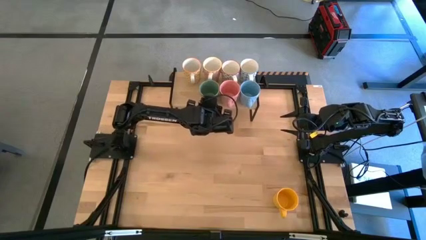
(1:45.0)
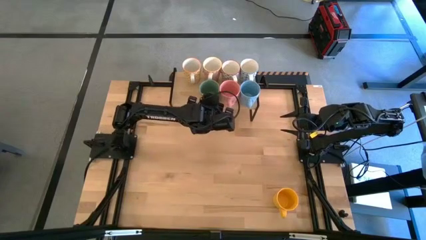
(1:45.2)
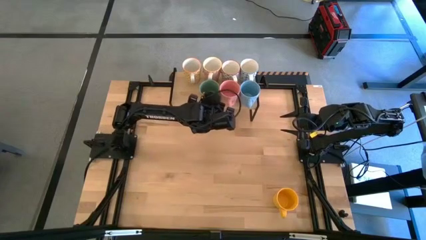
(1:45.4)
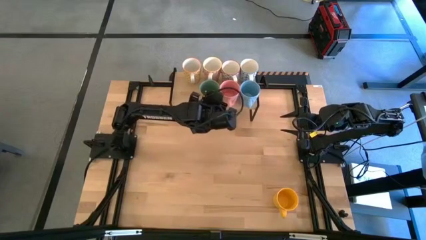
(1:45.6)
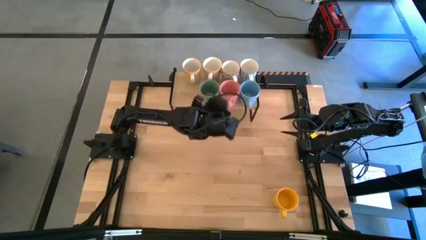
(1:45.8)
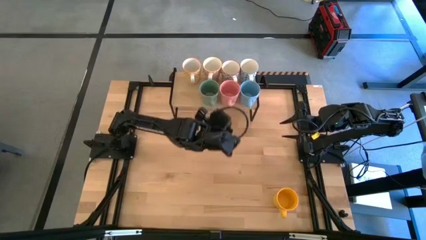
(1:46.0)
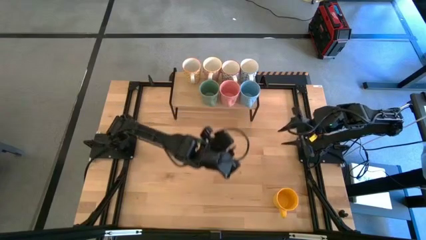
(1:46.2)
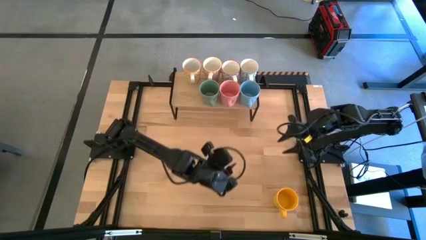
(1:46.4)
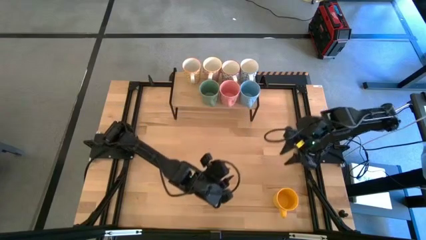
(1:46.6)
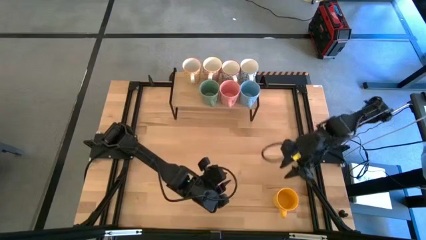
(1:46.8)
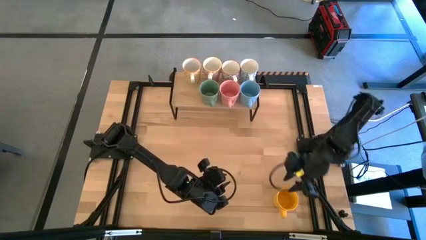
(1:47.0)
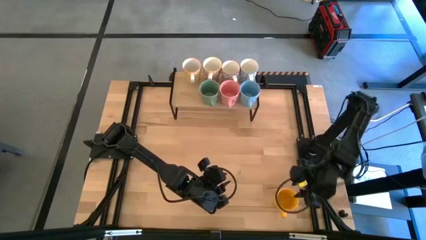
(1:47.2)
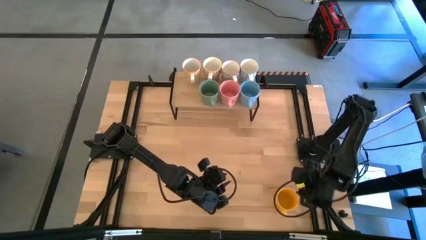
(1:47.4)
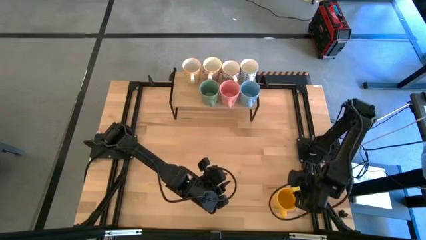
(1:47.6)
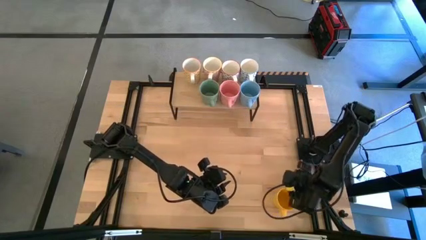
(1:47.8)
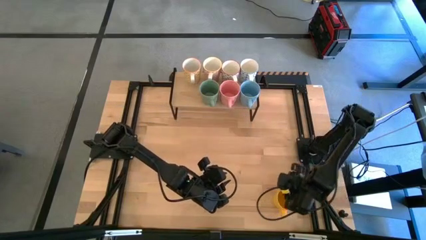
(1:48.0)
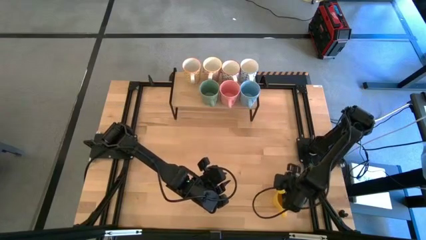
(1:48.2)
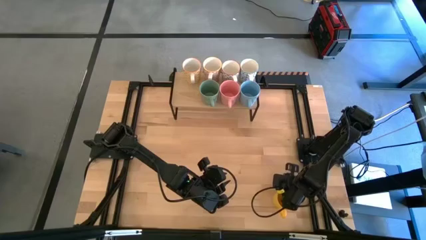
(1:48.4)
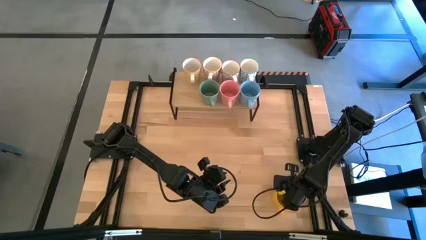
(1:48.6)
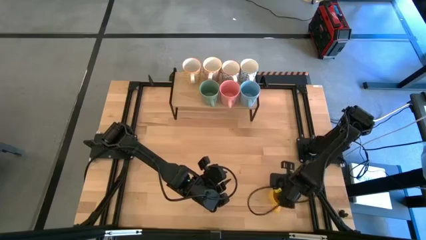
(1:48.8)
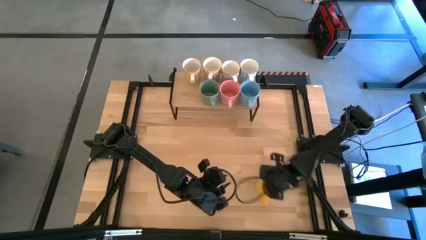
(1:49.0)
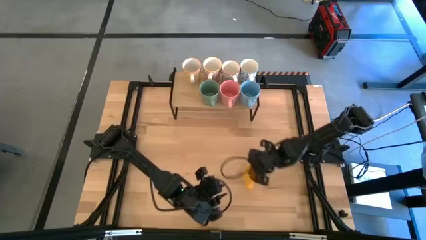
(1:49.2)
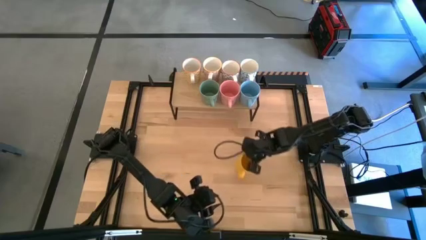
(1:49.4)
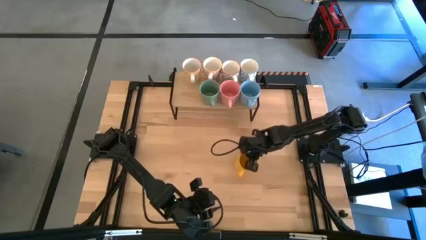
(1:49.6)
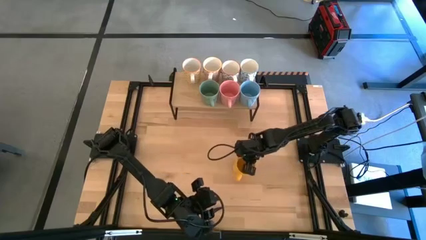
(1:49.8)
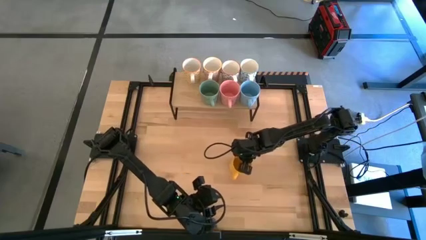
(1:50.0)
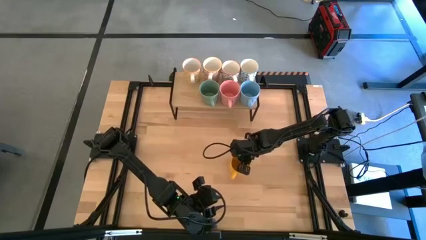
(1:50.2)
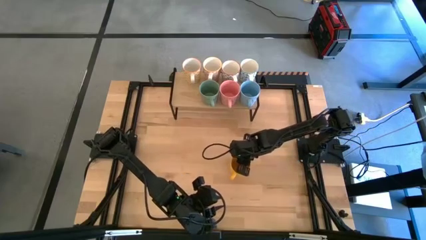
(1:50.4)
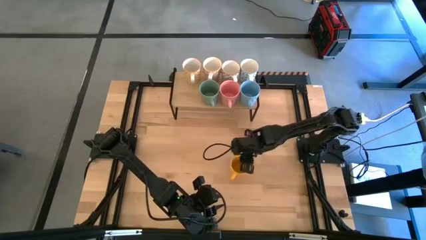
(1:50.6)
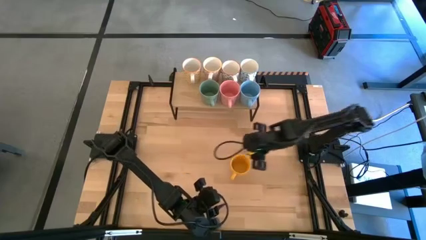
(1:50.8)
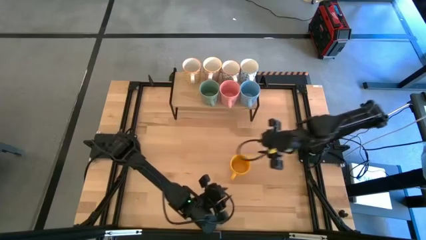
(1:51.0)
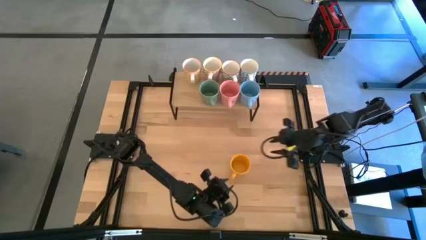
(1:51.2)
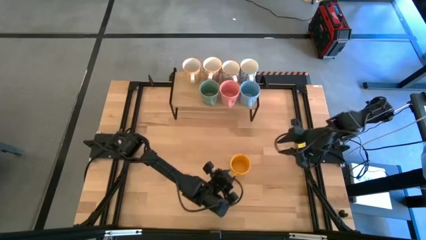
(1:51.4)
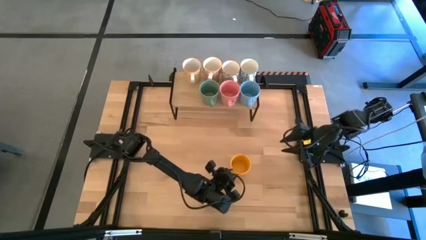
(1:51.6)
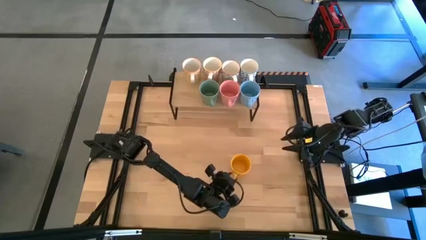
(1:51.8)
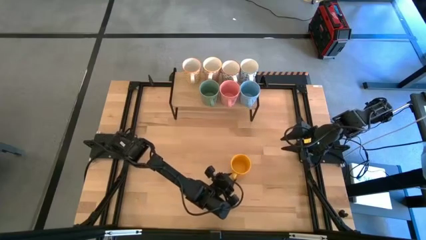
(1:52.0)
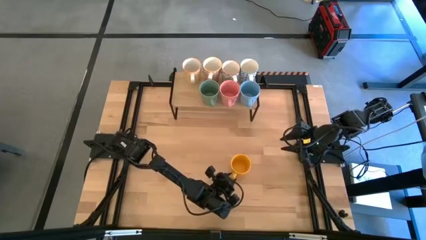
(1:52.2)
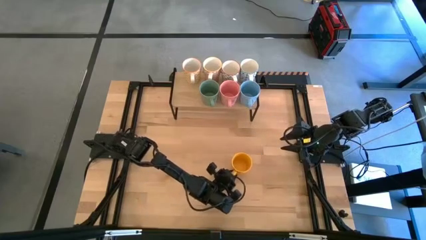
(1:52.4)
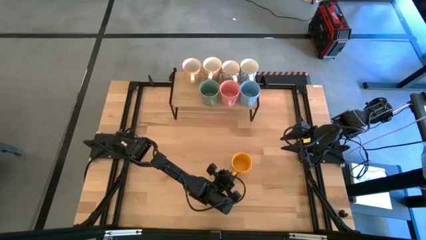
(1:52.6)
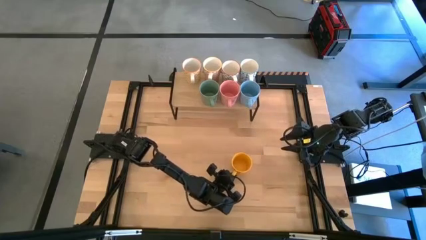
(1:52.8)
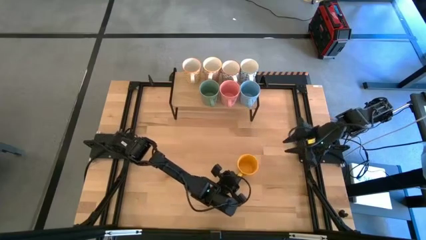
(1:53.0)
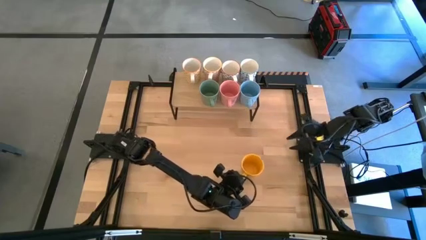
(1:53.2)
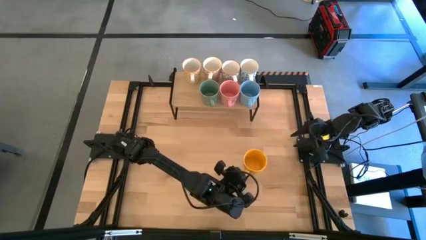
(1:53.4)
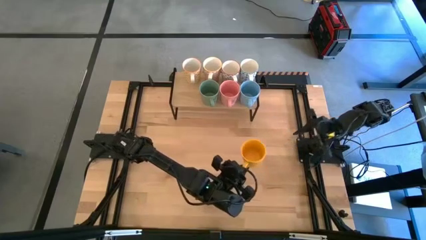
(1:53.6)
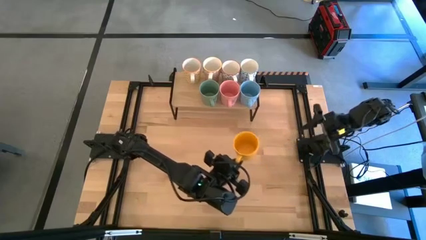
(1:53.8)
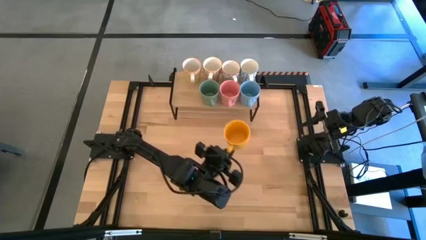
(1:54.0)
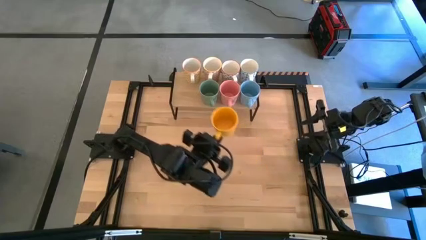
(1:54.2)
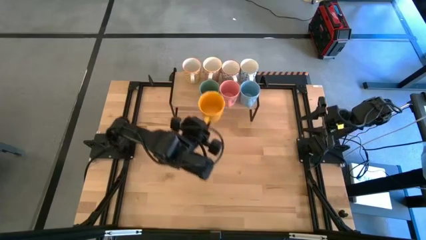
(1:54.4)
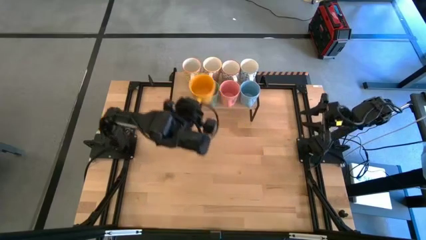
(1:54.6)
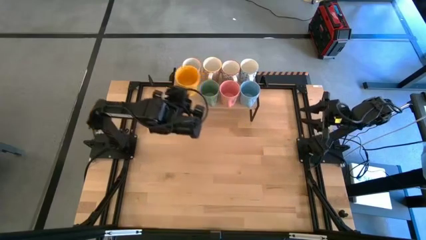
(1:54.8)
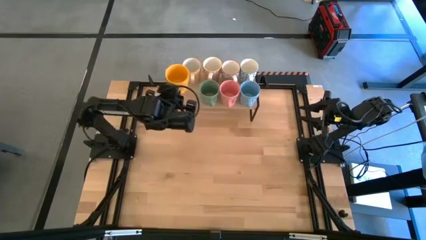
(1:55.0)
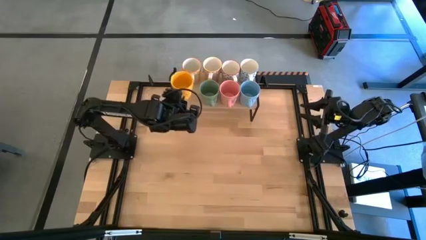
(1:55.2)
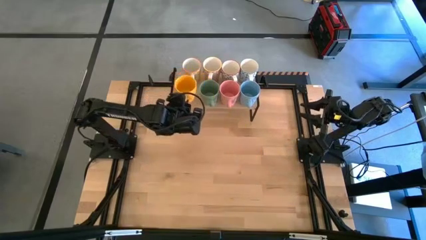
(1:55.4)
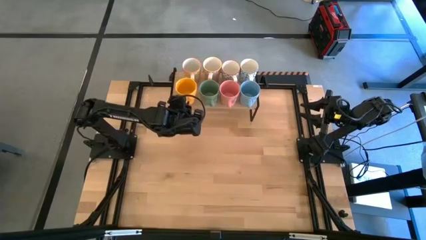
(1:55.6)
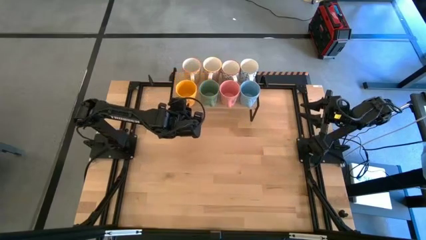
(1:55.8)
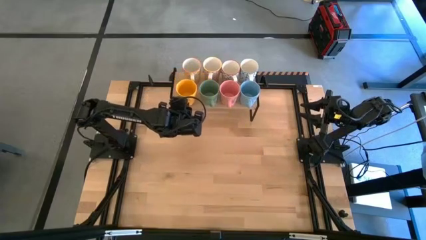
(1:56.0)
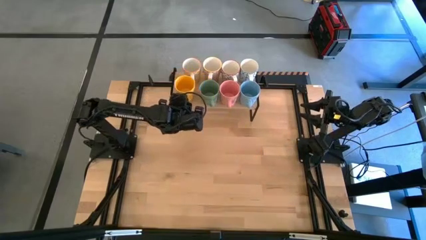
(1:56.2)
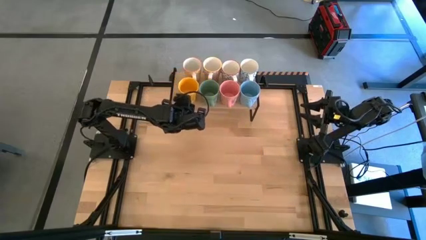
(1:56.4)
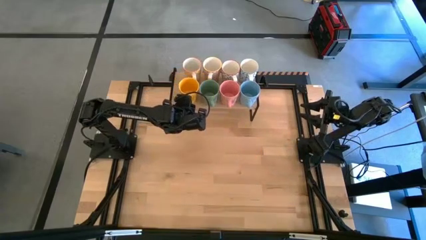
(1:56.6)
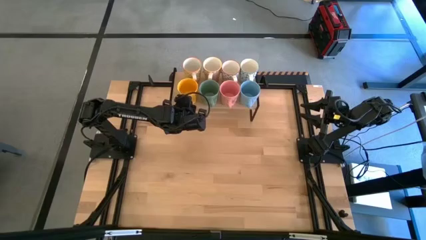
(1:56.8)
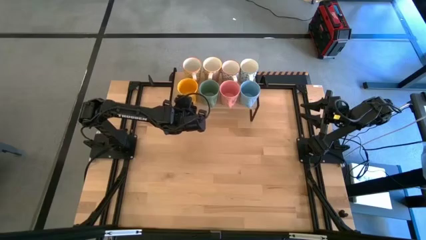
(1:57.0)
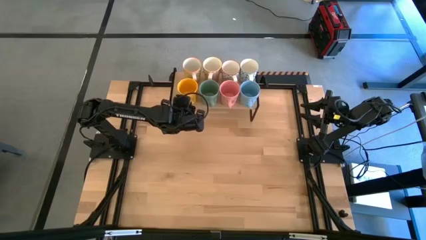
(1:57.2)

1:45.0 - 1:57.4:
Task: Place coffee mugs
Put the yellow mug on the shelf

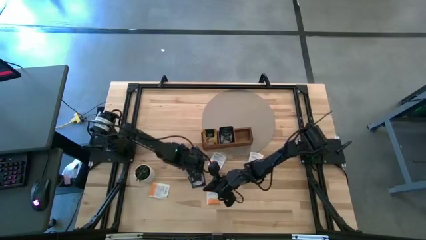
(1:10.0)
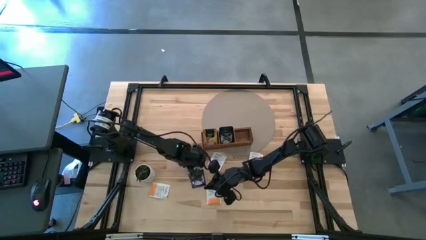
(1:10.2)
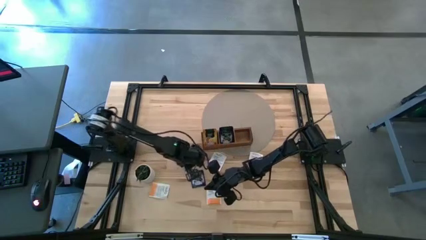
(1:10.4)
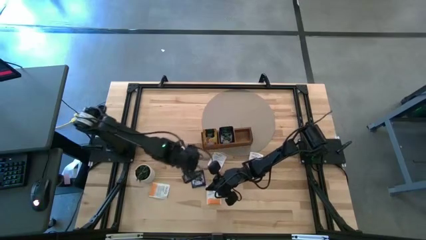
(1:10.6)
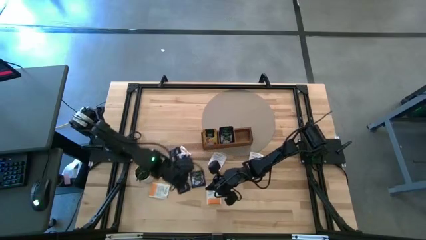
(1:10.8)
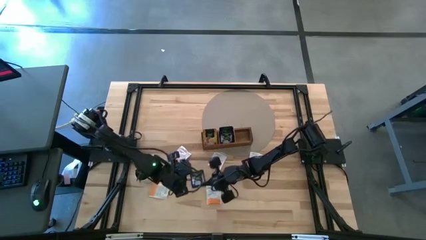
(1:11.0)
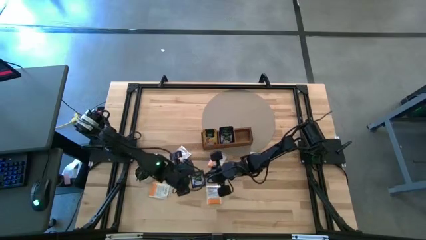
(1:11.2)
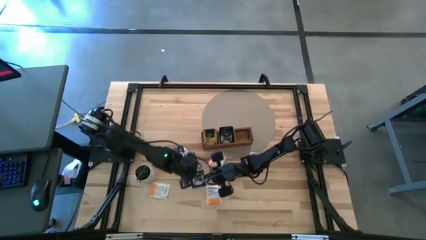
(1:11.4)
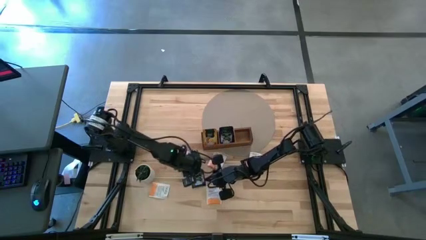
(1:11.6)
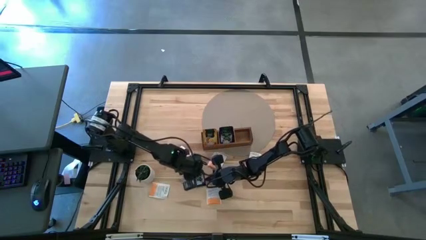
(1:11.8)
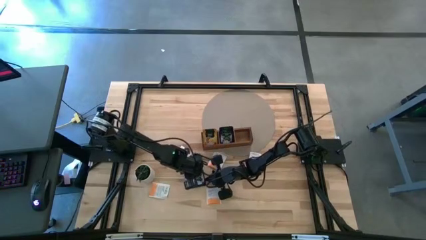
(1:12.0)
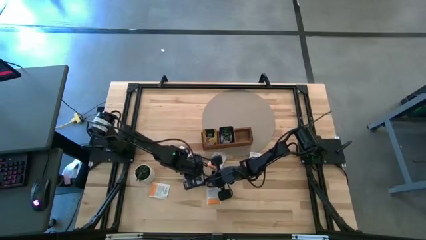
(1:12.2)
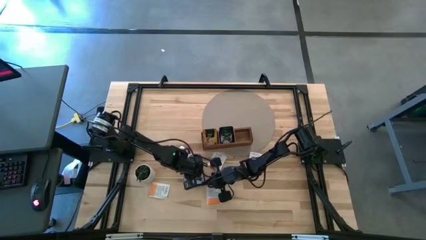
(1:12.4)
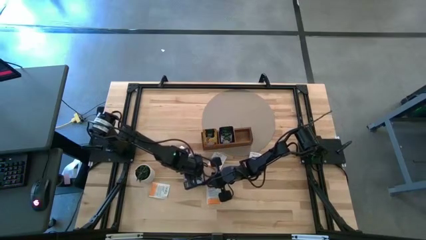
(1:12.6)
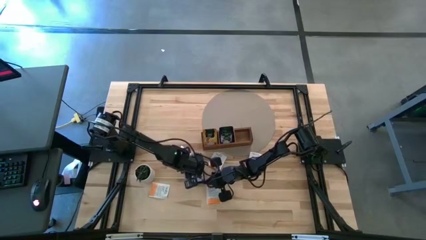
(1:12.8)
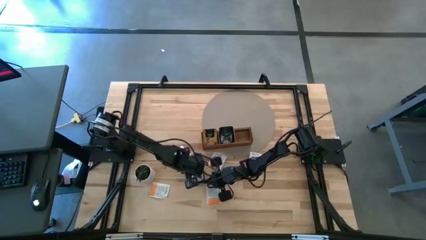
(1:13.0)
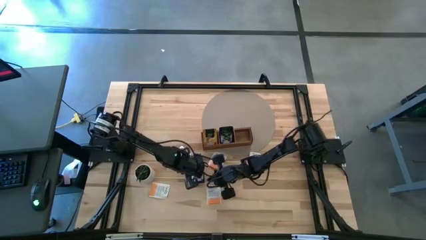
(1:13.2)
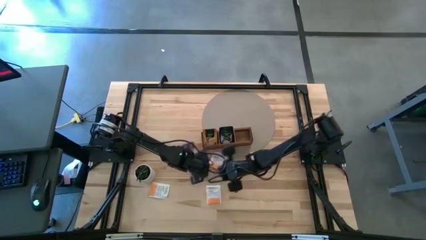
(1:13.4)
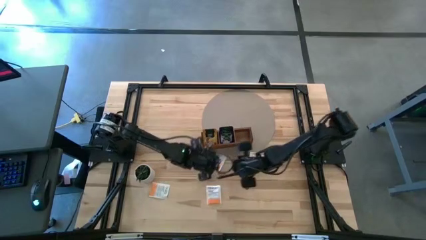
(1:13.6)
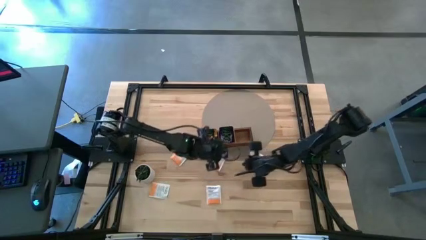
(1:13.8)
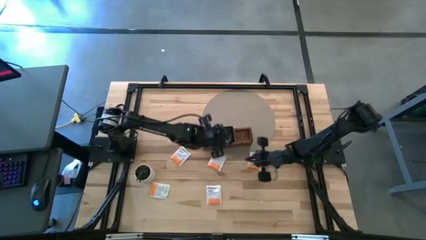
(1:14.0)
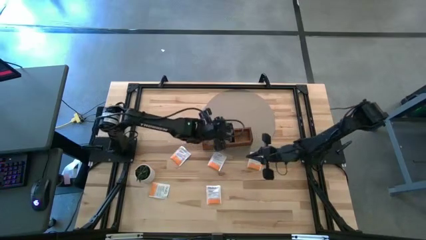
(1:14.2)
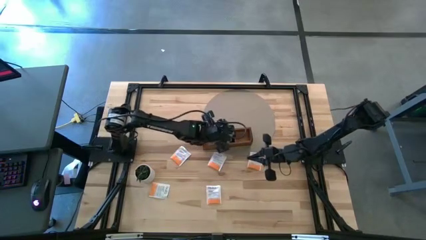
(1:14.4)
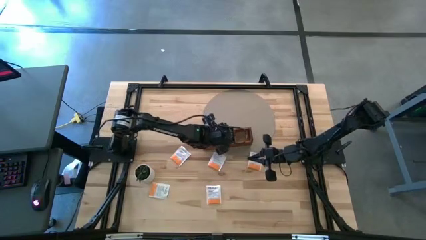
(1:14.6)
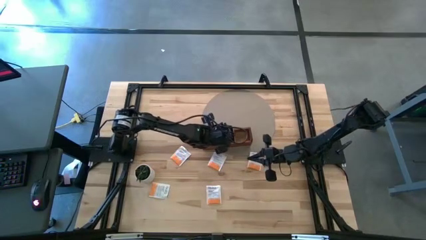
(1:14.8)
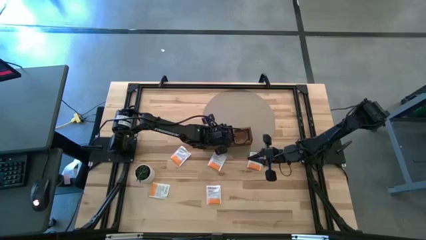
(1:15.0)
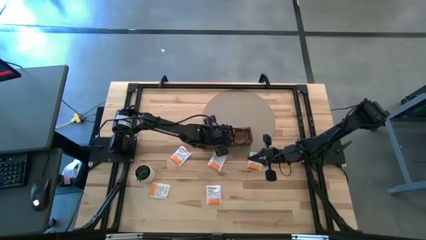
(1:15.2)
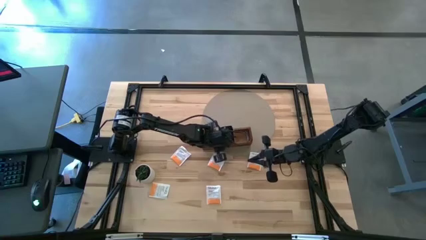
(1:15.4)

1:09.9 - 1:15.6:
Task: Pick & Place Tea
Put the violet tea bag into the middle section of the wooden organizer
